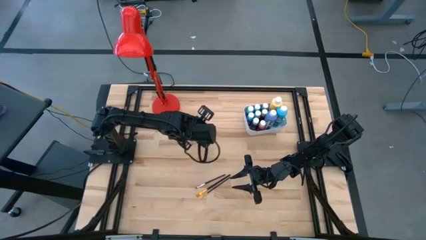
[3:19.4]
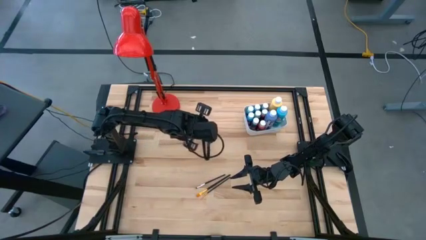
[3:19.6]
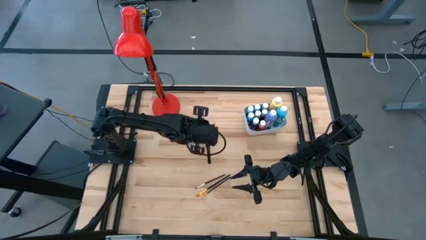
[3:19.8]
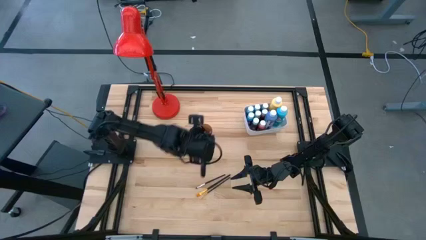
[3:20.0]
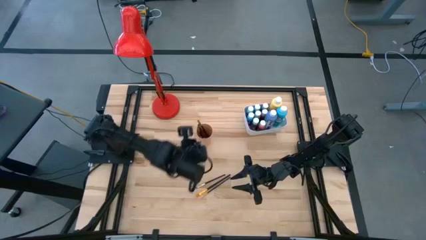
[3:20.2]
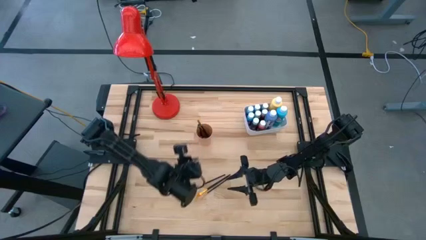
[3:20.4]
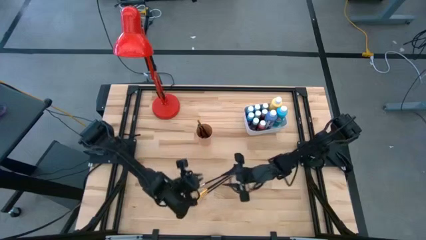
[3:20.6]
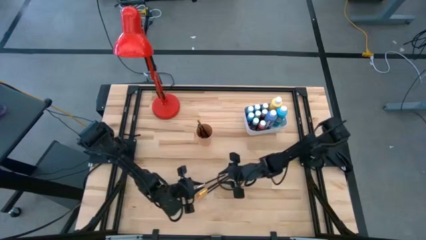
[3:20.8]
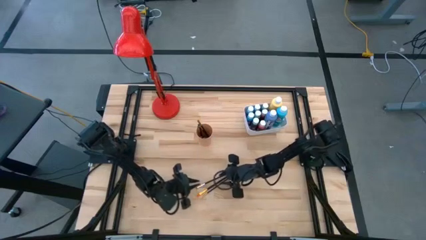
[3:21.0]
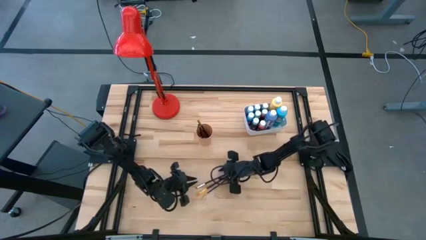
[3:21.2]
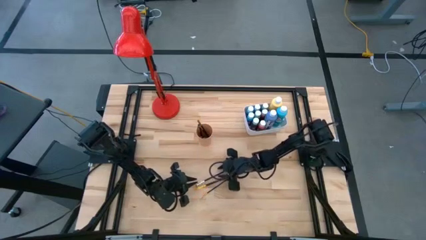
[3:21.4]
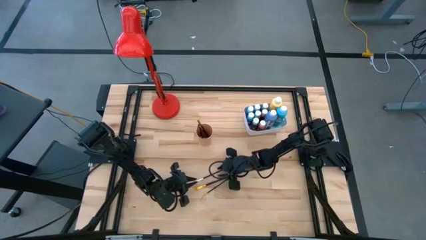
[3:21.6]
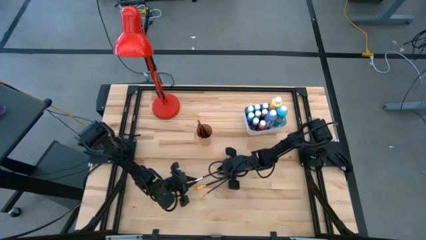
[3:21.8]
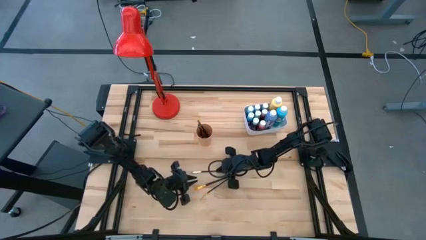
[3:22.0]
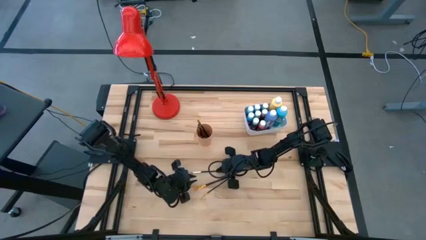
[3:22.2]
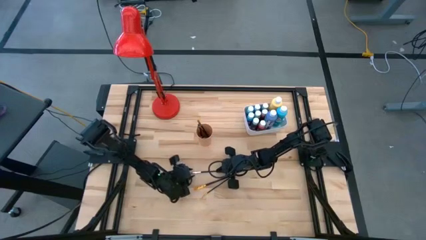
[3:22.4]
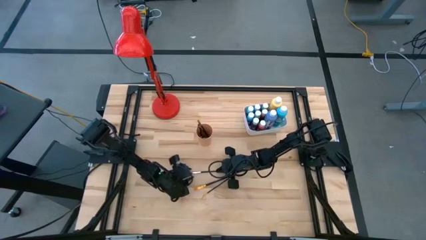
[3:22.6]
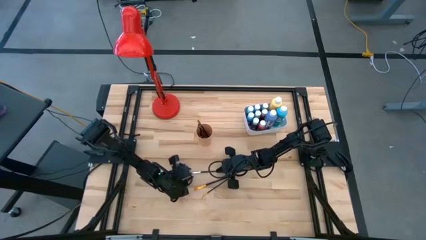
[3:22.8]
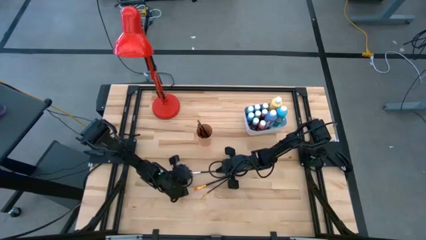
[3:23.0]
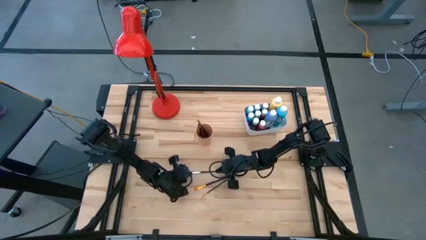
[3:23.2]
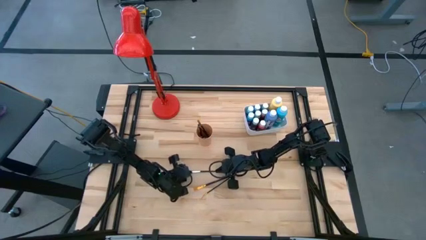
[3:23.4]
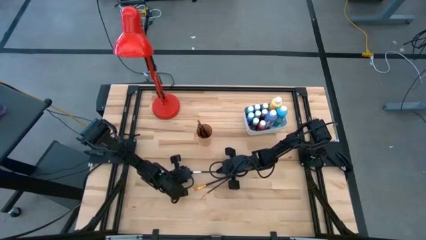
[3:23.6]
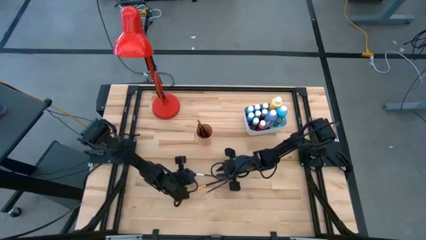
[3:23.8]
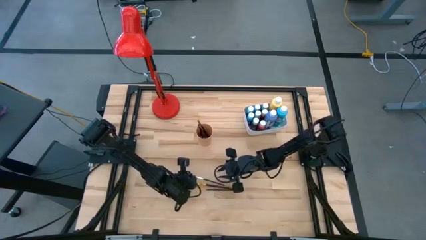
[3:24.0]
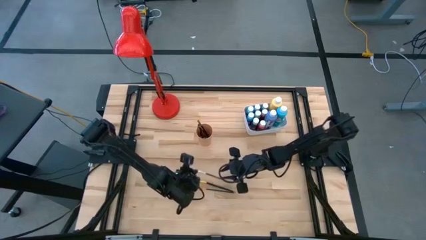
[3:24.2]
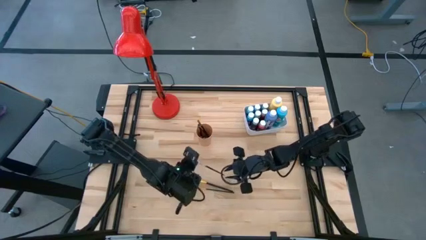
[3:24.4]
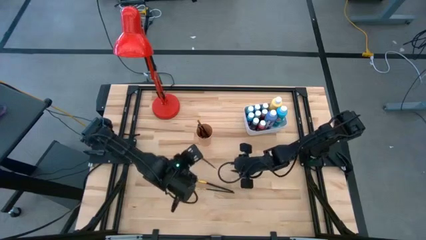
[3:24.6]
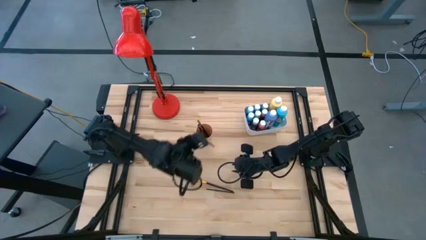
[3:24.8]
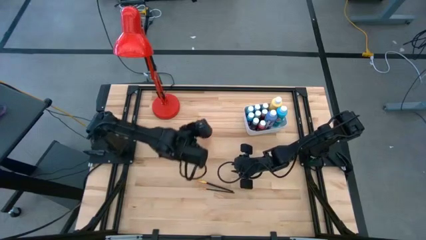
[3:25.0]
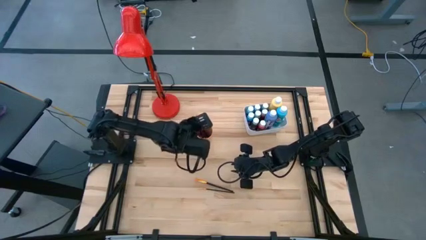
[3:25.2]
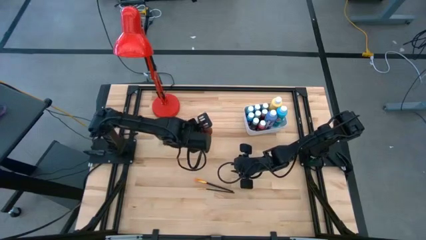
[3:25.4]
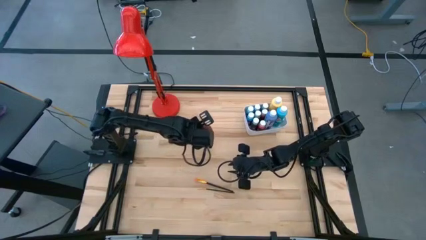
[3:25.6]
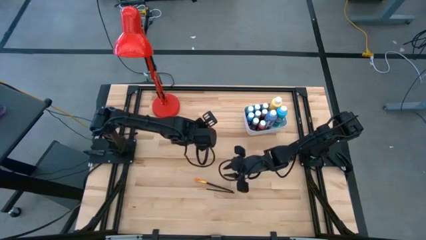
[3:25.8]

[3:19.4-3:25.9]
Task: Pick & Place Paint Supplies
Put the white paintbrush into the orange cup

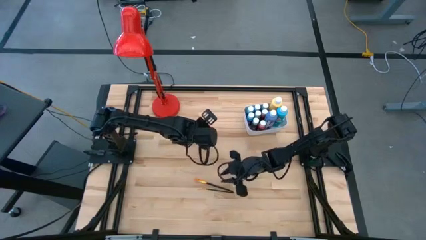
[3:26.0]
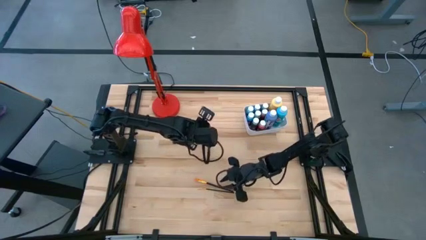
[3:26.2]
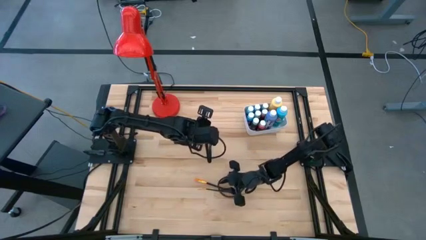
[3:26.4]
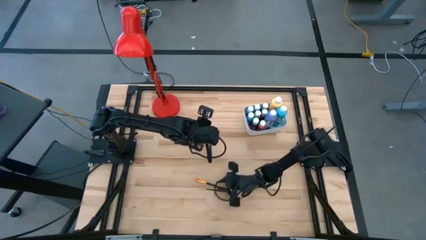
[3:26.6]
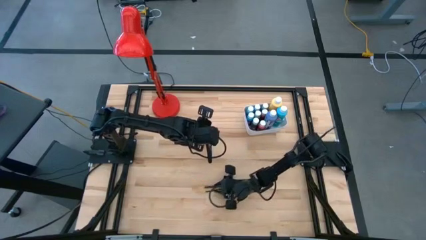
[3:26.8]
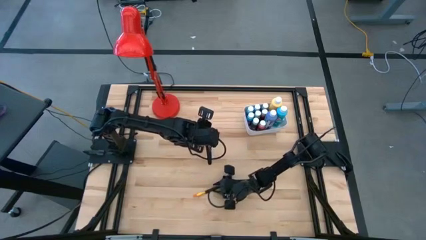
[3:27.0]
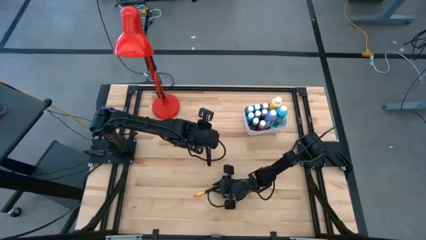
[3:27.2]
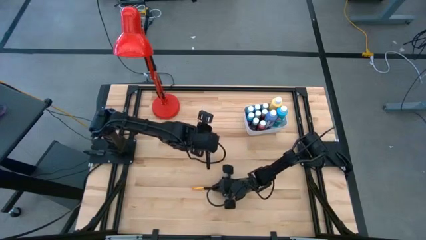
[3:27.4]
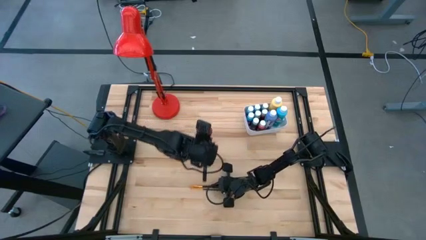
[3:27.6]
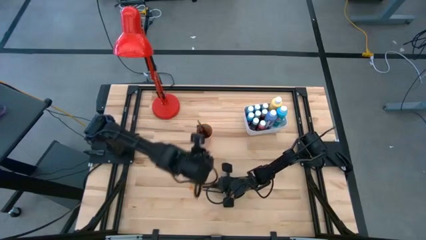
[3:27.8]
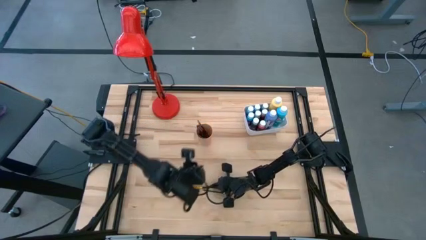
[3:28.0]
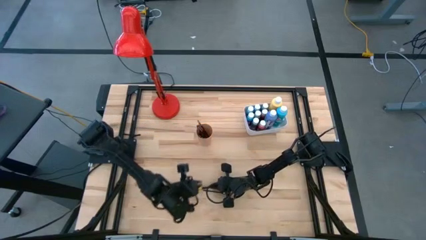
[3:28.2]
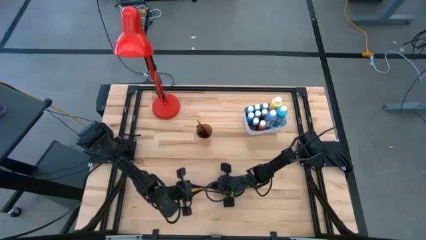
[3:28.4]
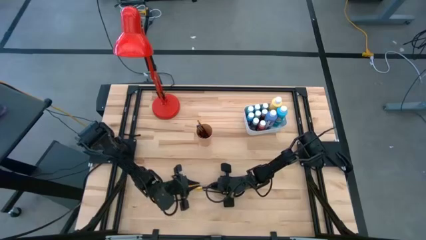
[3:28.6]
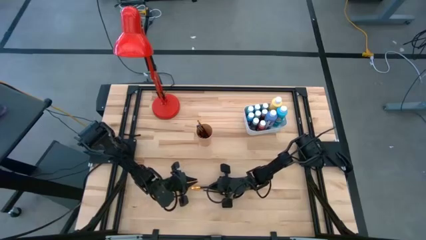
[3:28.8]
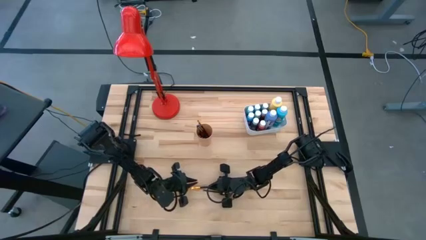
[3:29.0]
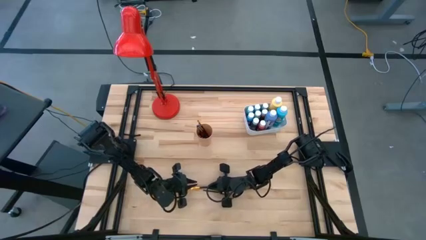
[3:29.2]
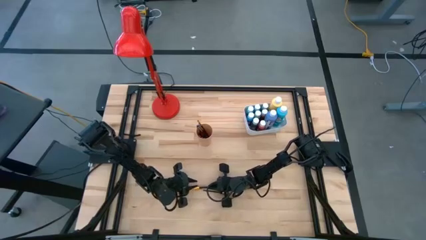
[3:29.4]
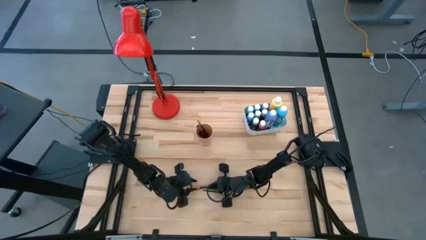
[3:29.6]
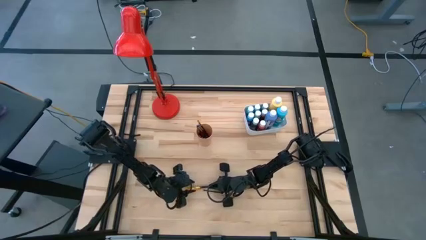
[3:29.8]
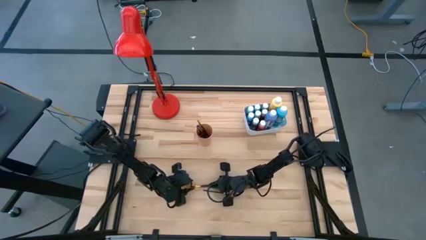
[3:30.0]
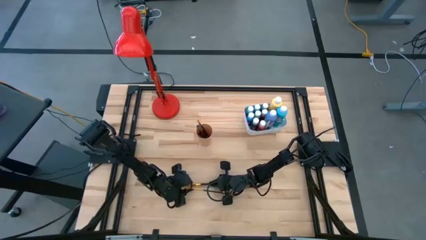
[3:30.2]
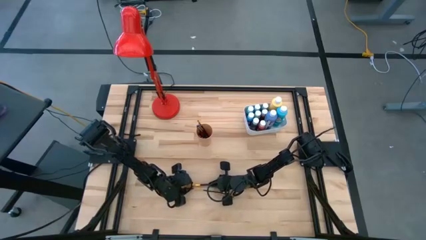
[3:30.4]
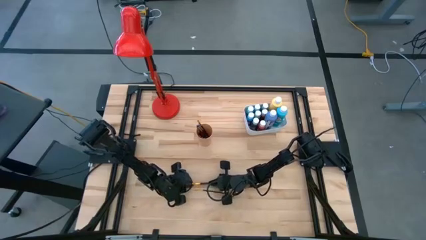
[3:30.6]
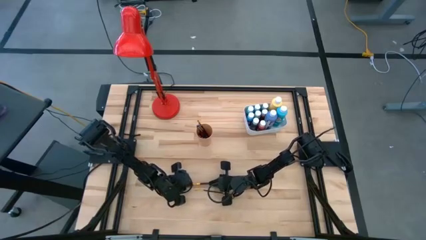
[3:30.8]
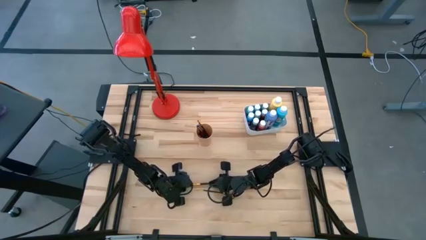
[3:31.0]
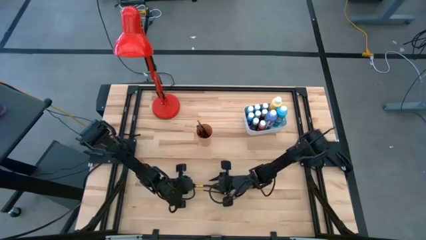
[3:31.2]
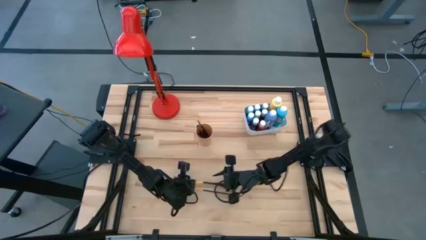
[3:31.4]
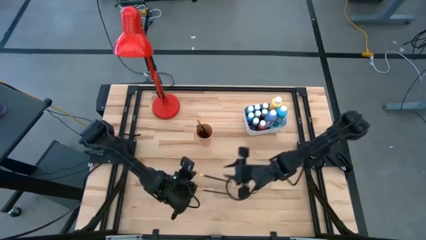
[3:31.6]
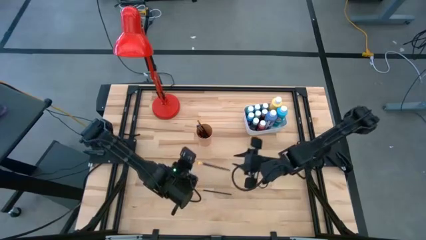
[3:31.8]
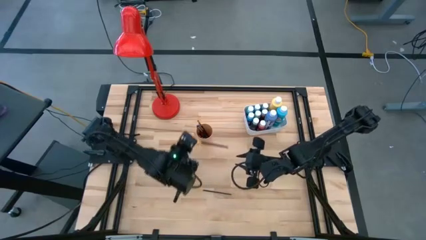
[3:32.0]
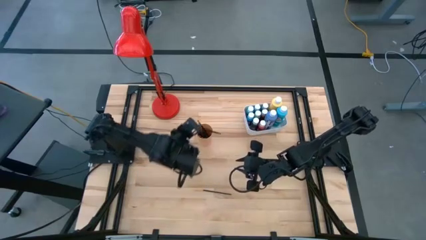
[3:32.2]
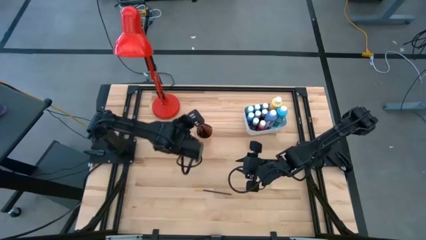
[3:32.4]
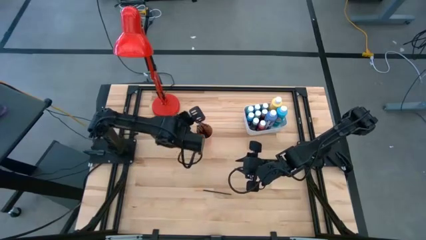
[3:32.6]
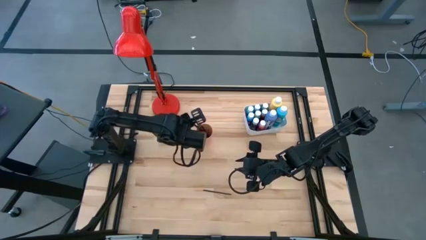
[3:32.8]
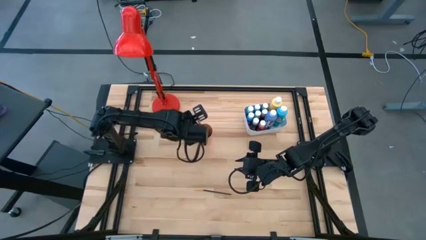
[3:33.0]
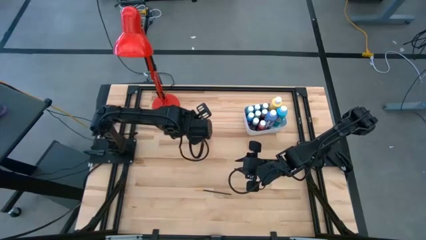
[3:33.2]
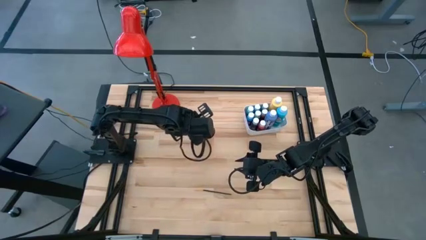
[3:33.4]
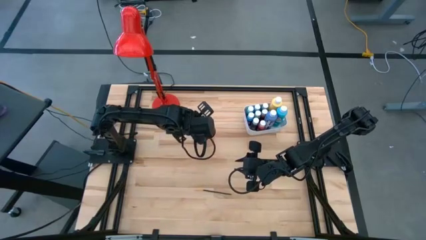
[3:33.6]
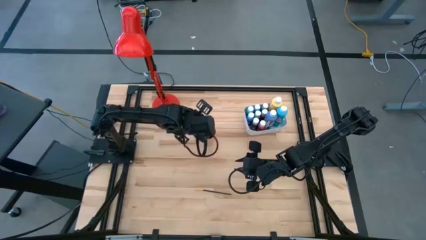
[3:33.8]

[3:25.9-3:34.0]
Put the orange paint brush into the orange cup
